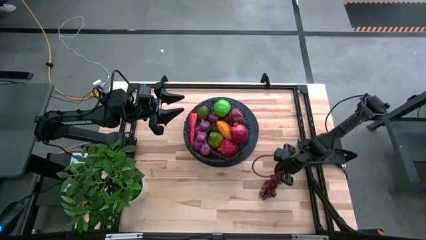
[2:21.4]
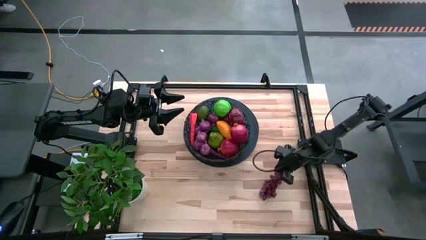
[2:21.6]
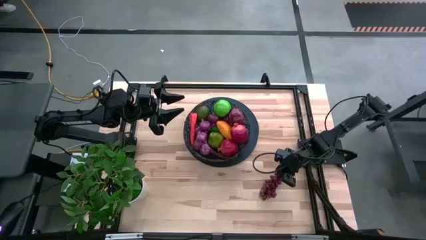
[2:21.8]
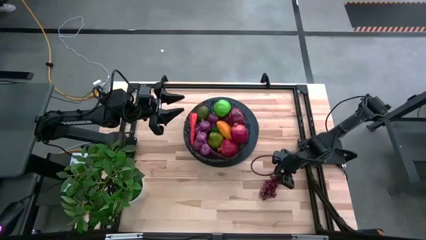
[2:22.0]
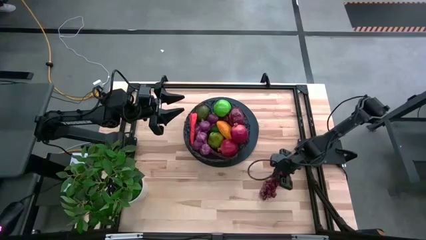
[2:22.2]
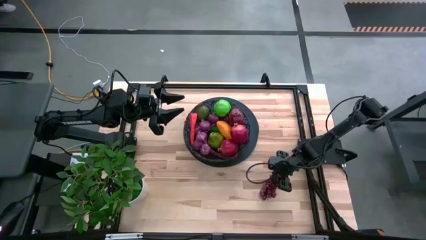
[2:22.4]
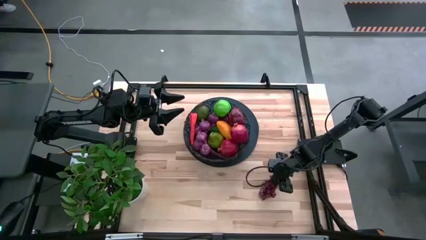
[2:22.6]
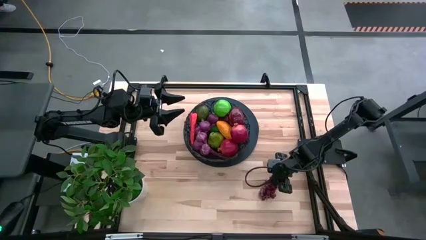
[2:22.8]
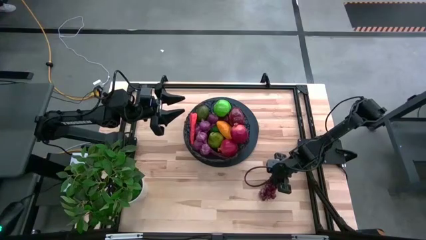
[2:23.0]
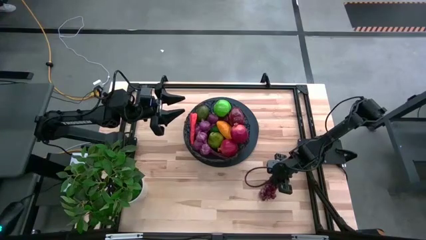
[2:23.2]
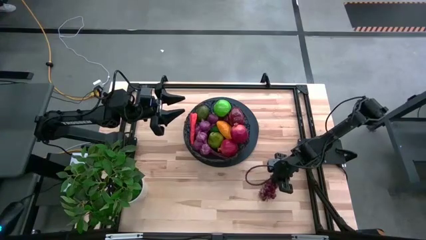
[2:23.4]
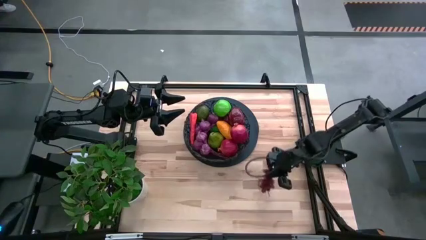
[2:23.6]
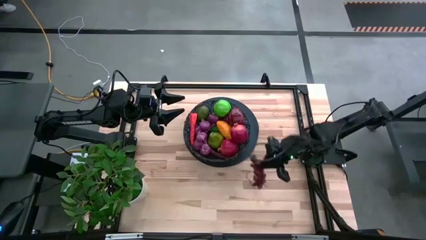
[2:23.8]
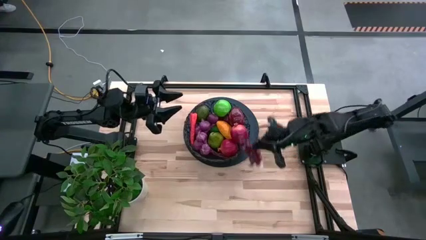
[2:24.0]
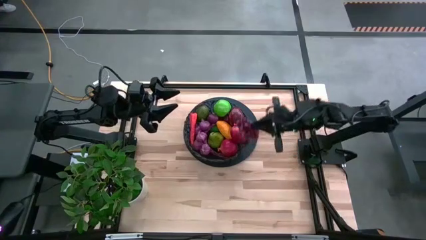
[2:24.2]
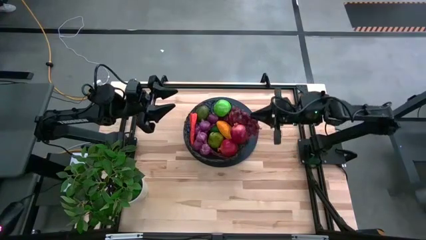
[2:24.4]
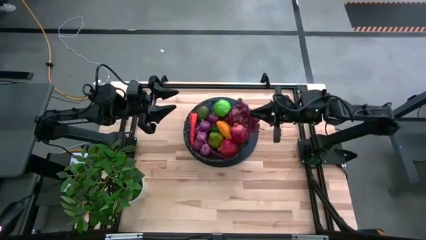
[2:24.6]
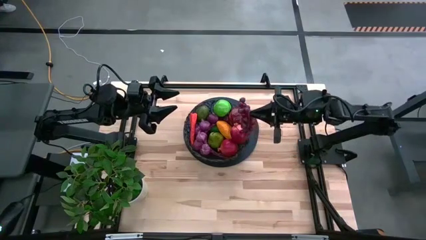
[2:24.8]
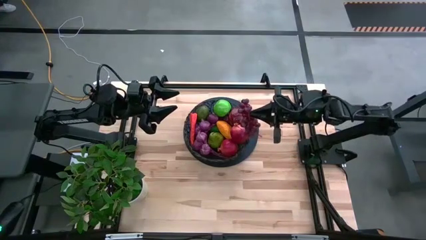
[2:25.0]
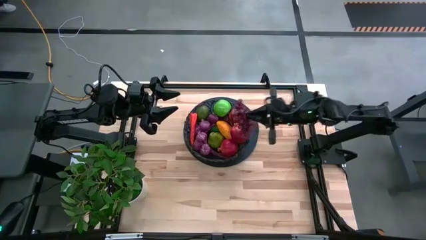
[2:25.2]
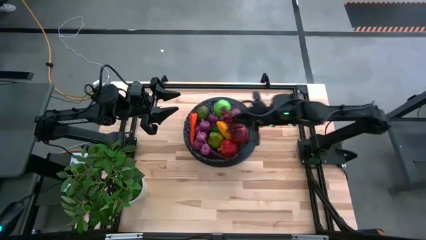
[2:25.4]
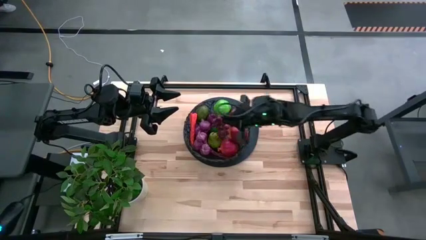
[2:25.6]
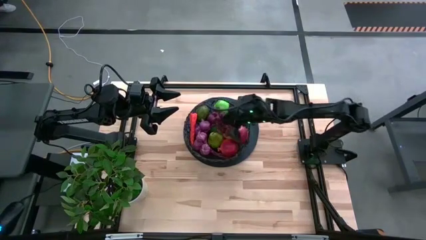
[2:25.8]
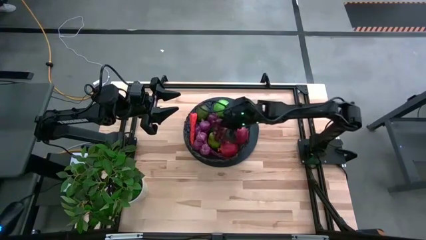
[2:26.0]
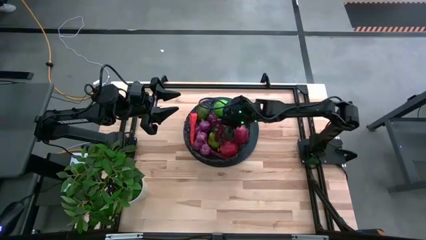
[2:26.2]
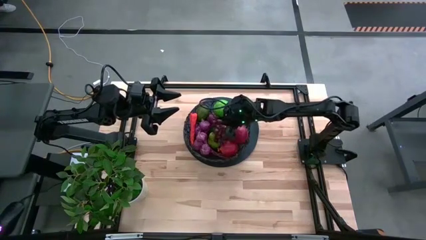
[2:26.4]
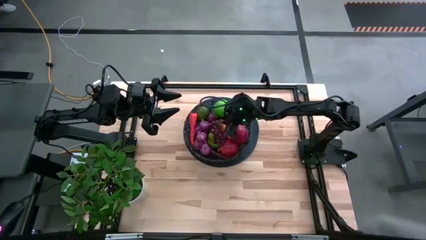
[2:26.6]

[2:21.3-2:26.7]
Task: Build produce basket
Put the violet grapes into basket

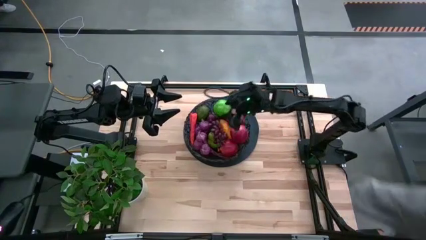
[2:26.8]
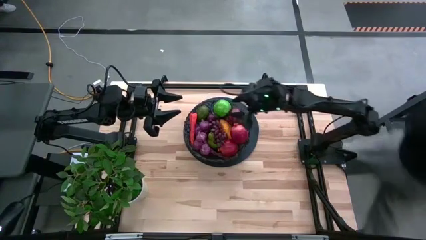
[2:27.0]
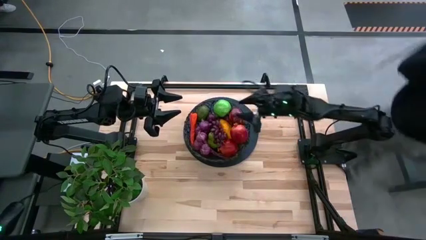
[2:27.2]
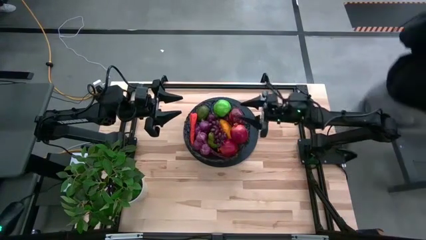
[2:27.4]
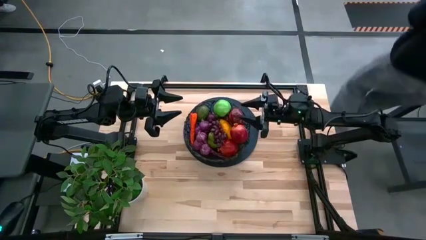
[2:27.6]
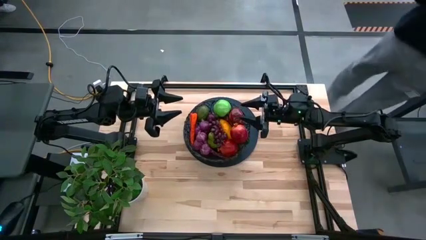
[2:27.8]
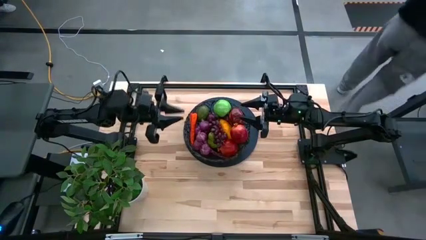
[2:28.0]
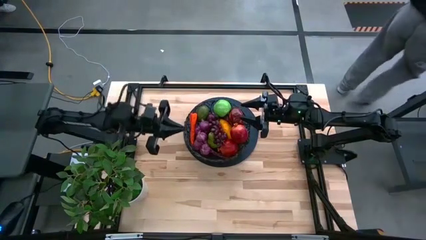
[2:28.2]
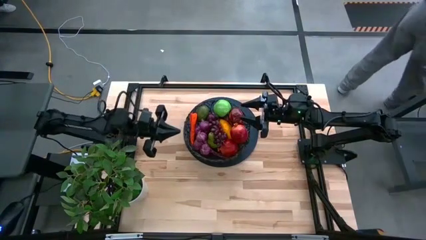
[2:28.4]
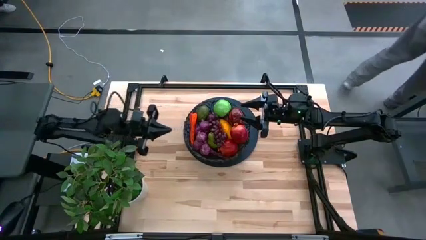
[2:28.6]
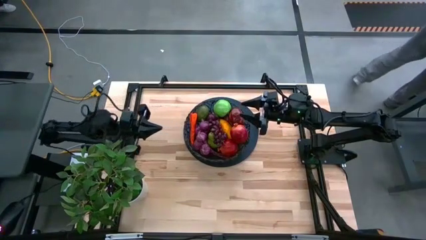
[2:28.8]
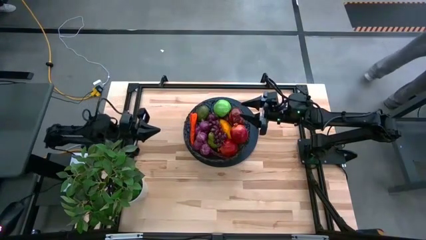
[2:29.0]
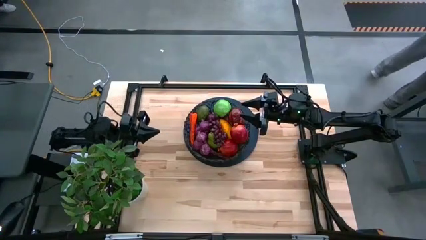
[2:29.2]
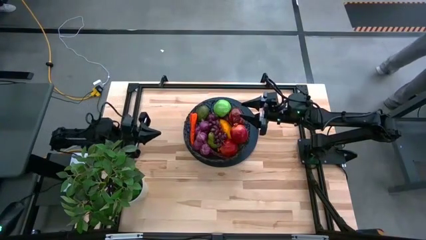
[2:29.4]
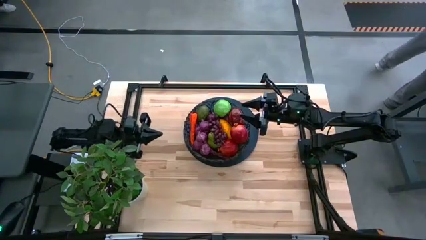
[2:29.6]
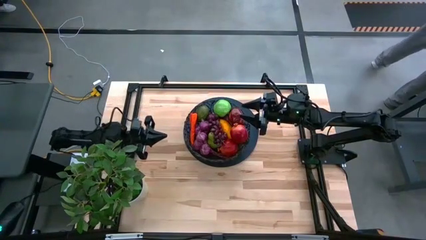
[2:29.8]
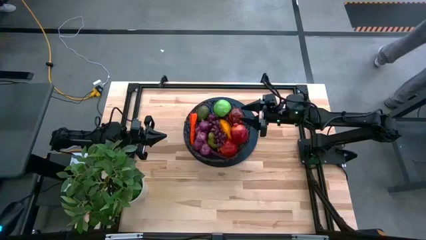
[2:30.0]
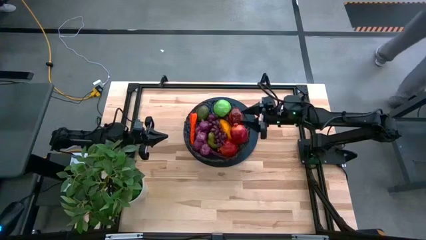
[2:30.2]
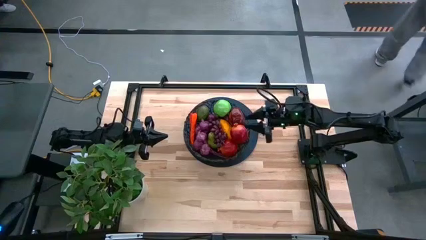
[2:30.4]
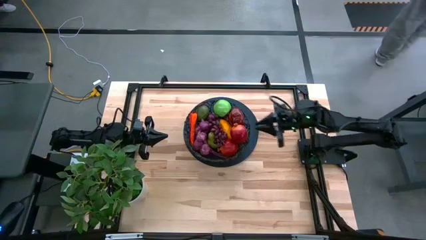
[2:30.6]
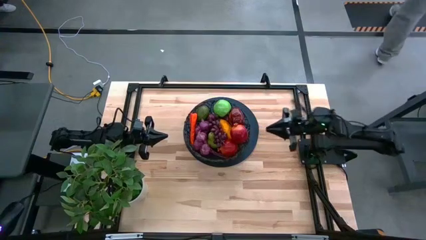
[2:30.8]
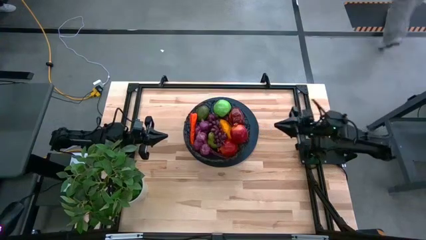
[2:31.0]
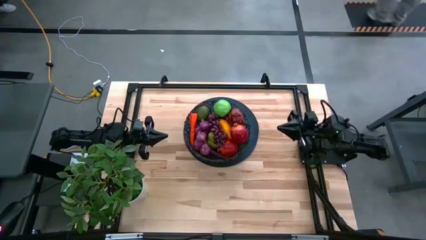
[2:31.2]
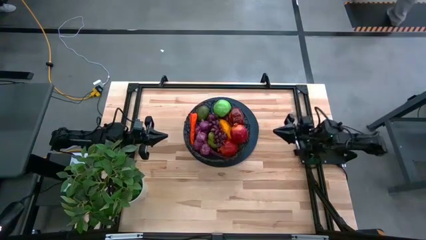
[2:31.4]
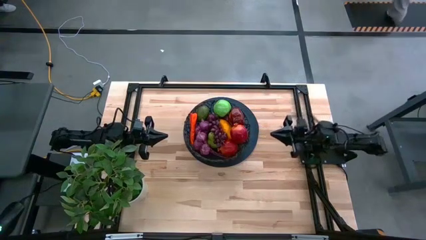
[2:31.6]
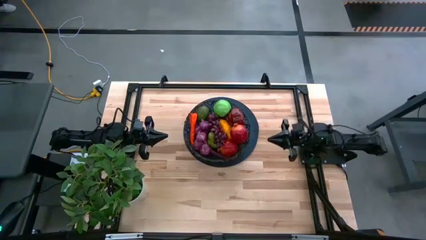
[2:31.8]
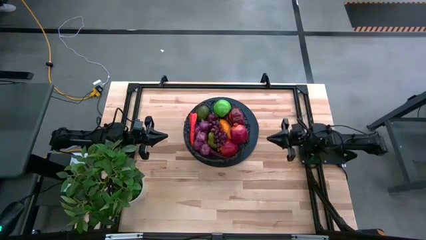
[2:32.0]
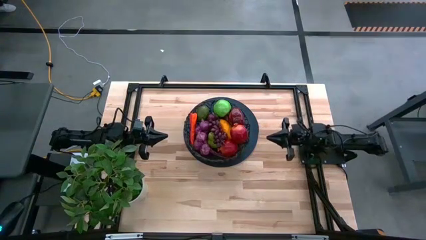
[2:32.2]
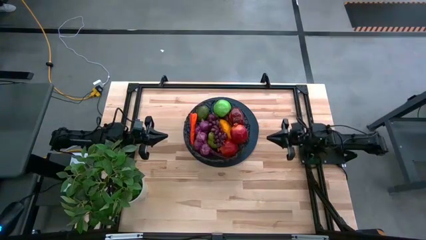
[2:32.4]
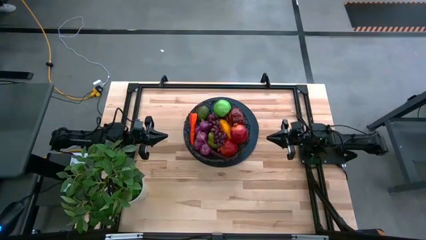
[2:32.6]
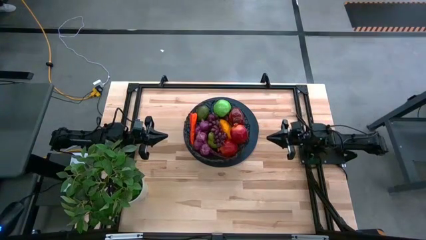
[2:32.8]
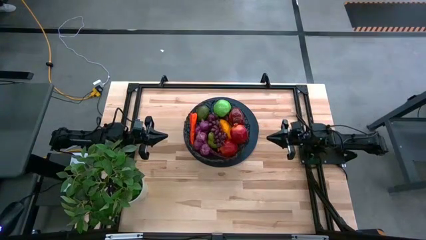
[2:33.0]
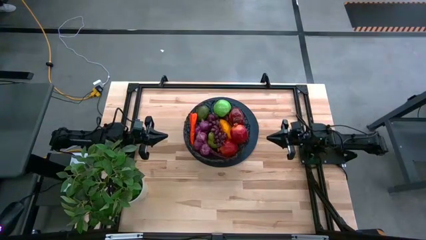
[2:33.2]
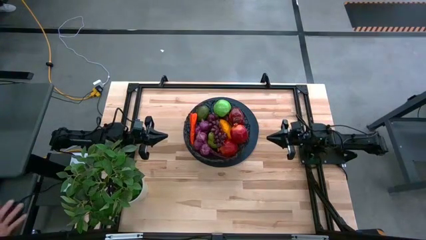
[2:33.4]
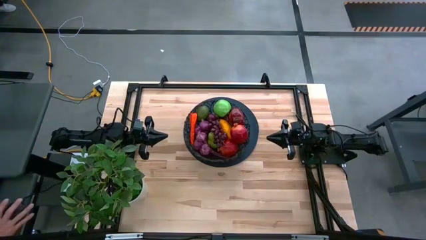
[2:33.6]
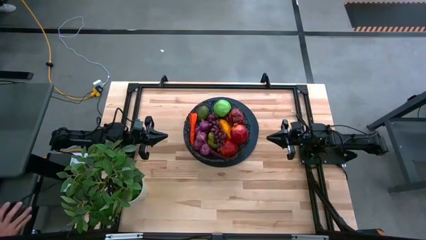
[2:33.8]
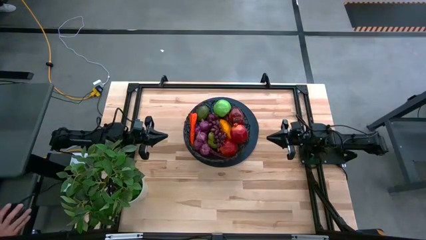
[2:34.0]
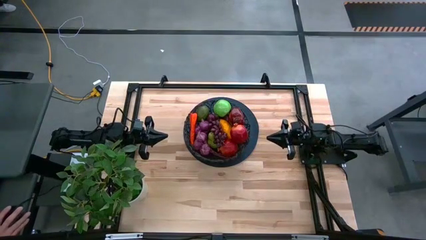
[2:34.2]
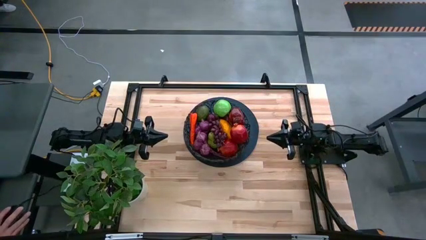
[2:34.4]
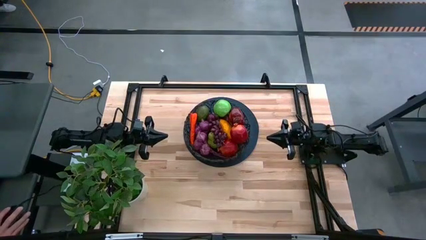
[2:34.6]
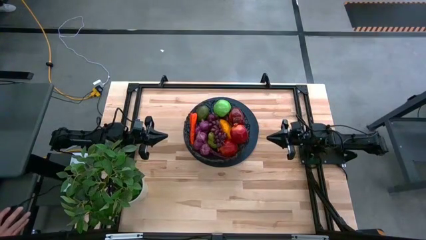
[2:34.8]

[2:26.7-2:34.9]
Return to Home Position
